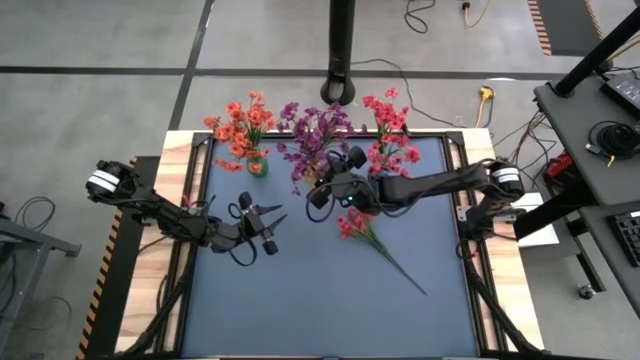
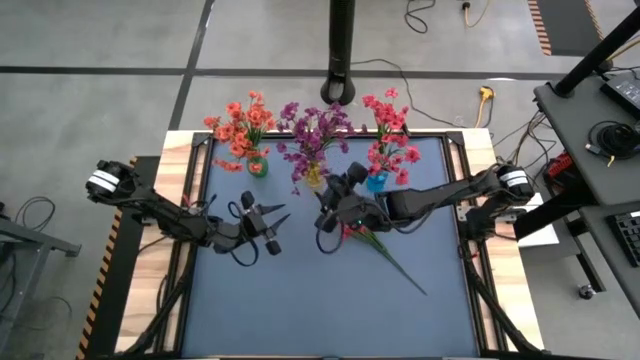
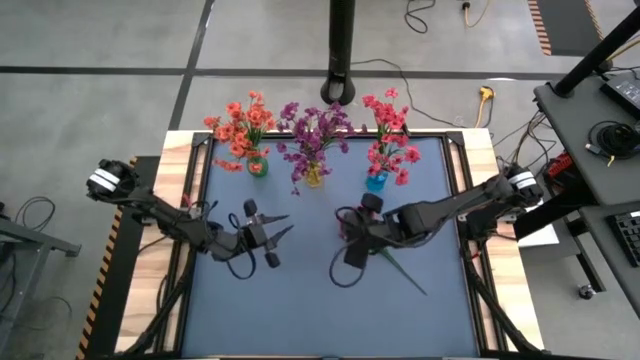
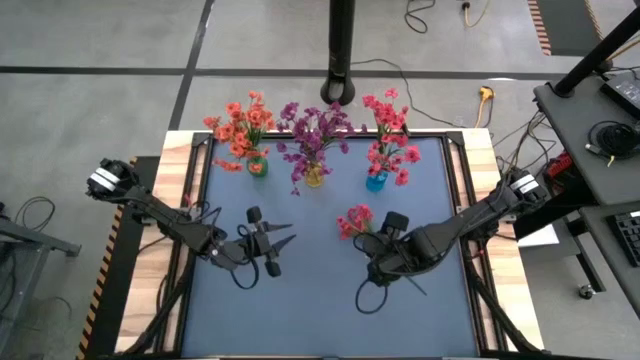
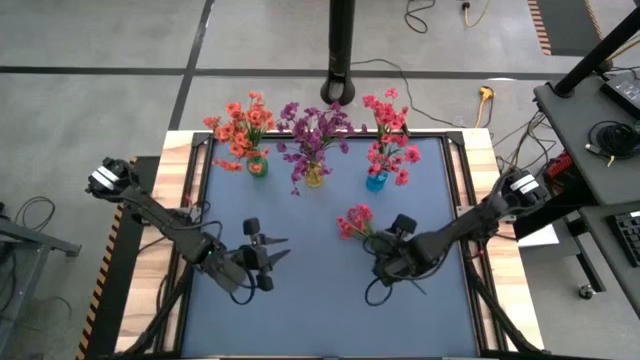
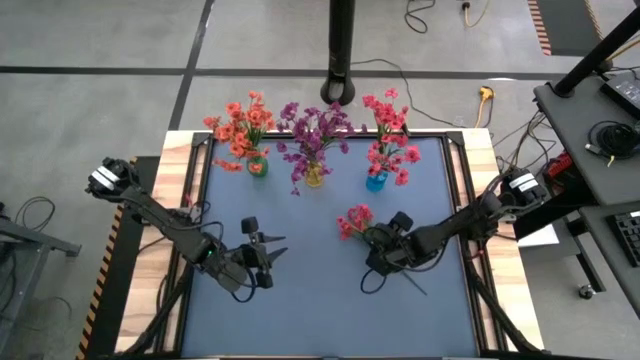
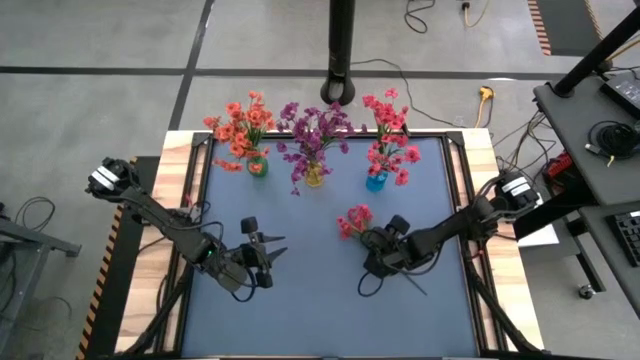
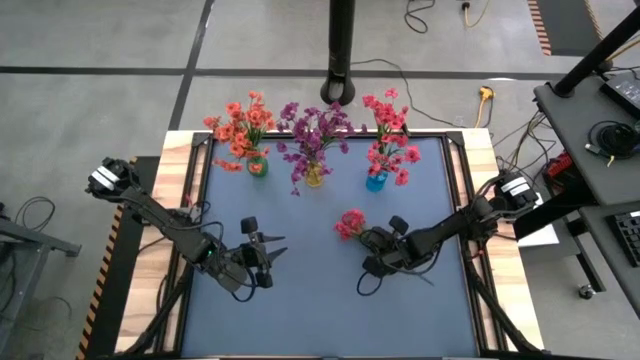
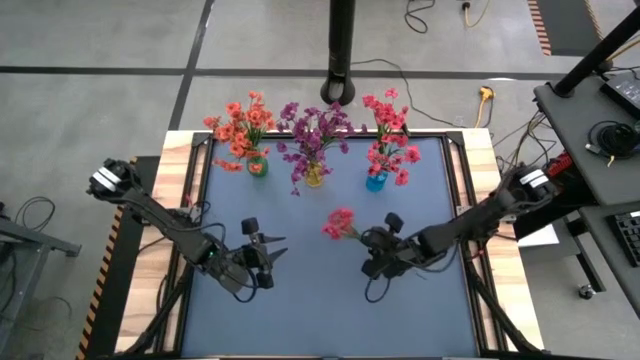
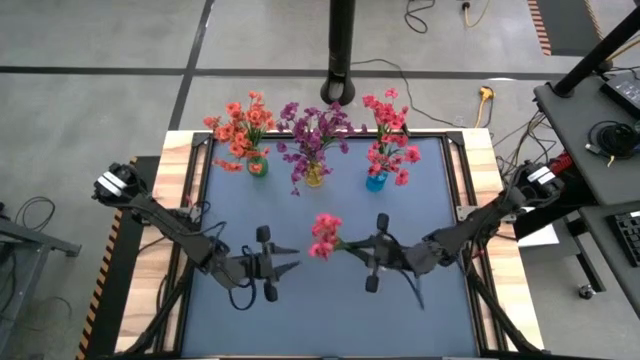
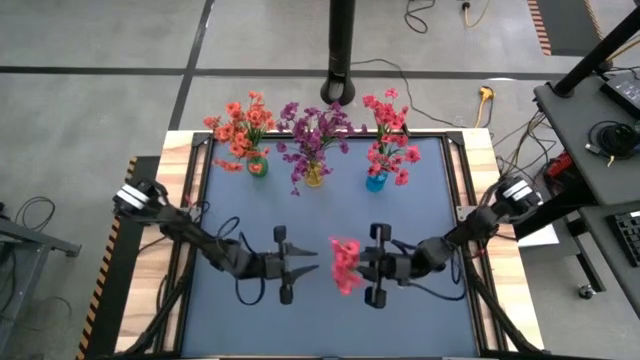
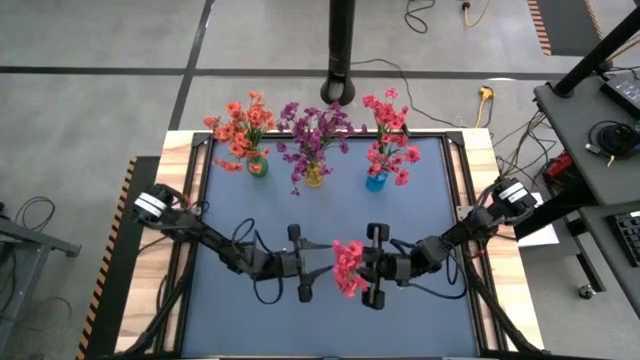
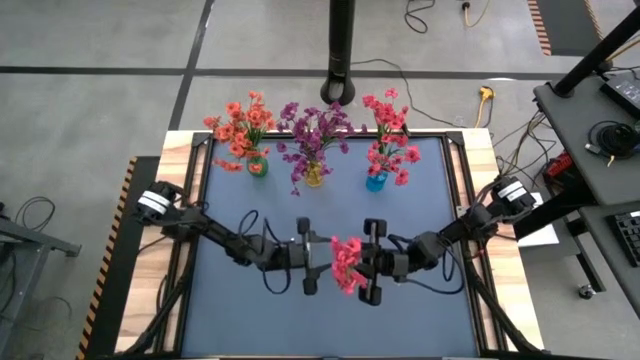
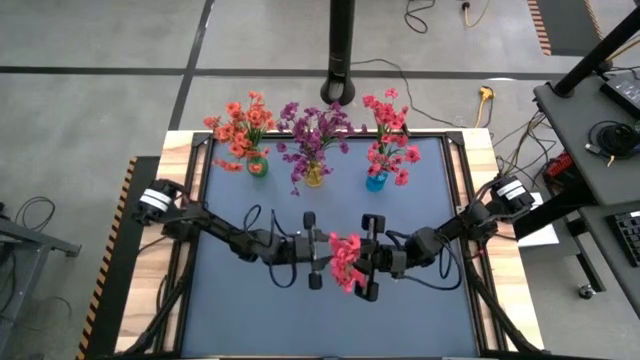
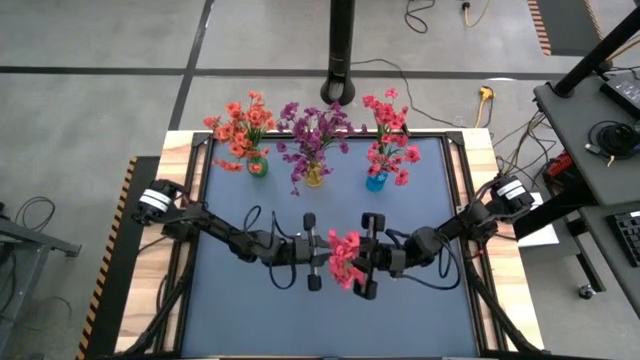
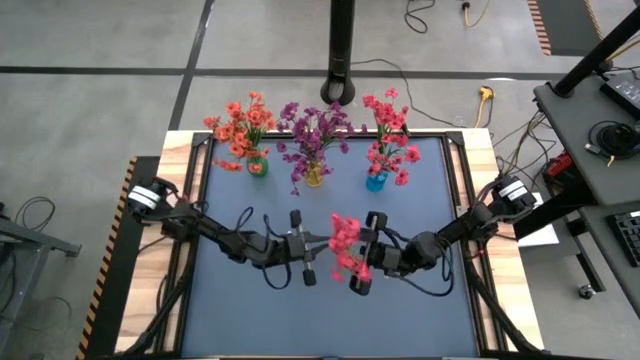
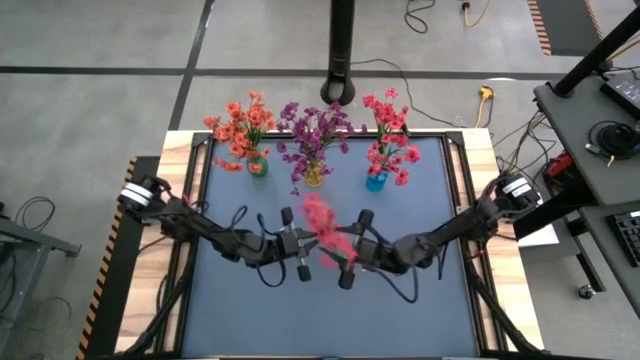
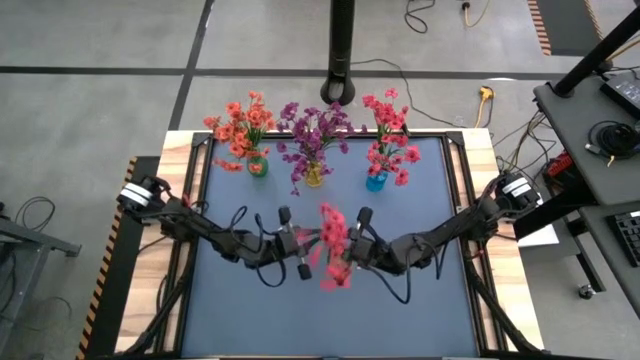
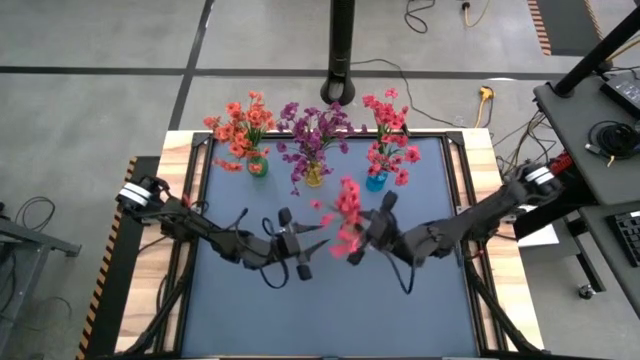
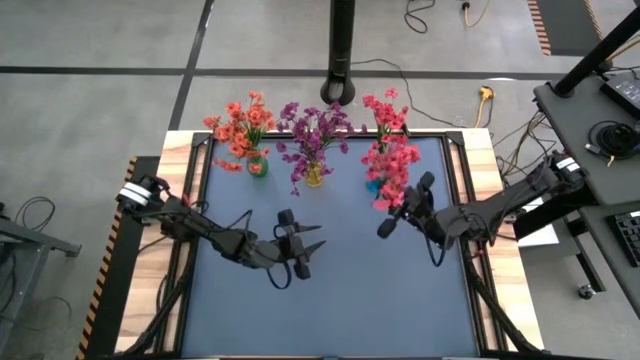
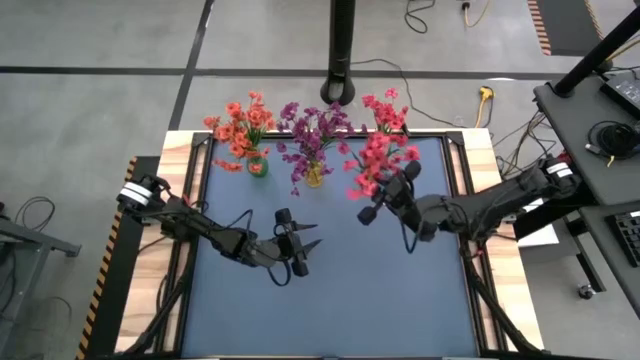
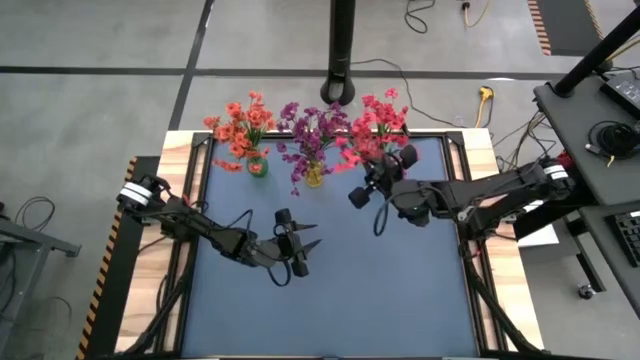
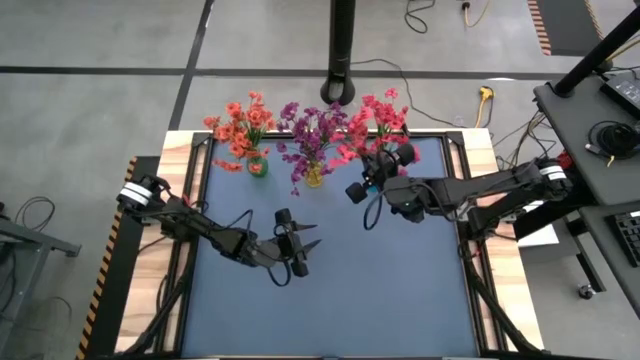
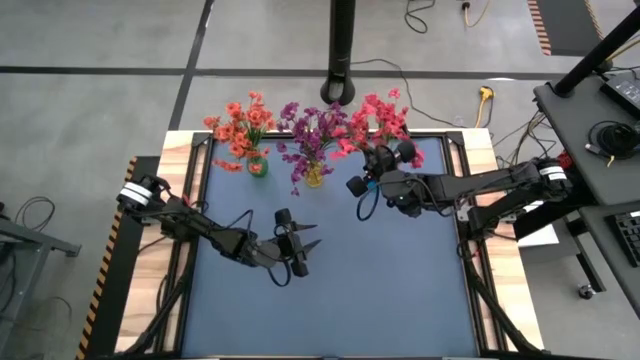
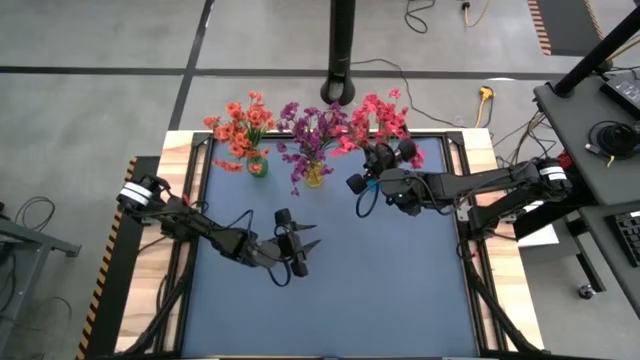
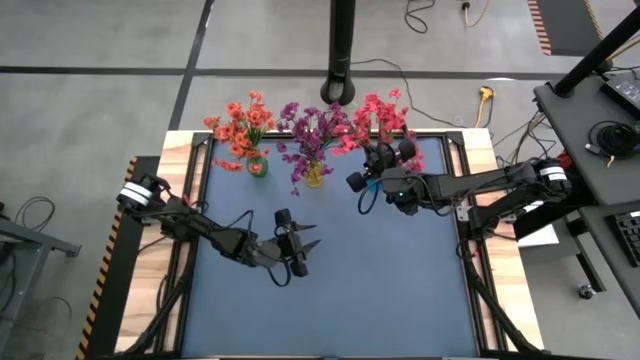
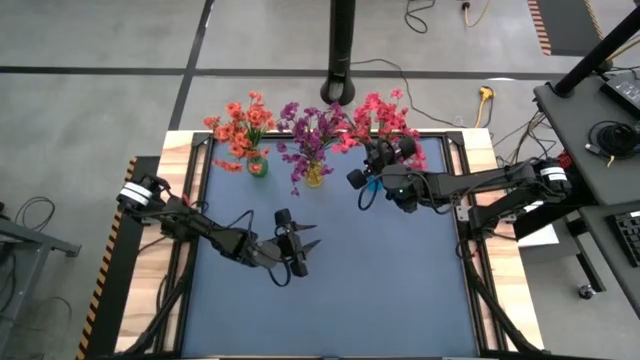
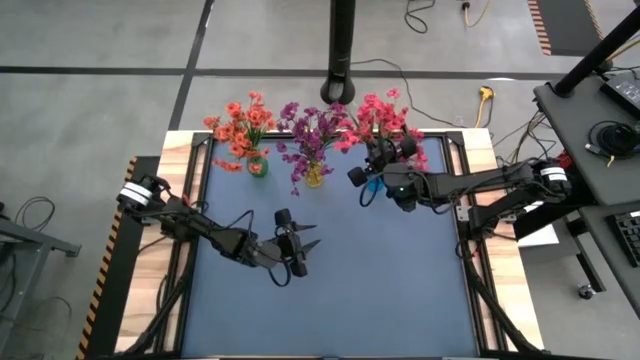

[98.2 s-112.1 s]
Task: Sort flowers into vase by color
Put the pink flowers into the blue vase

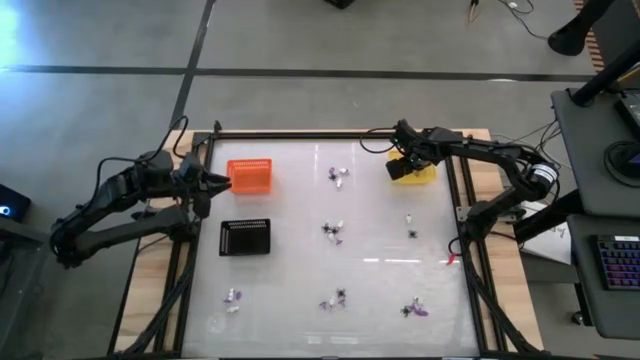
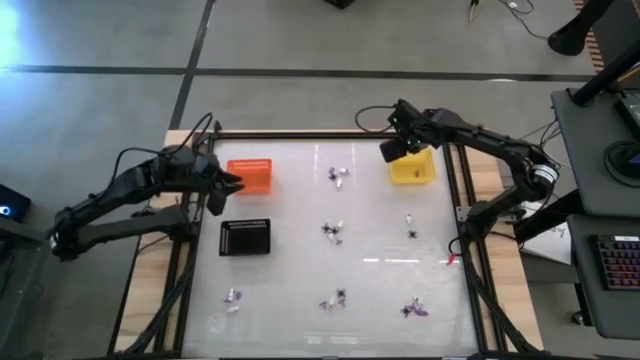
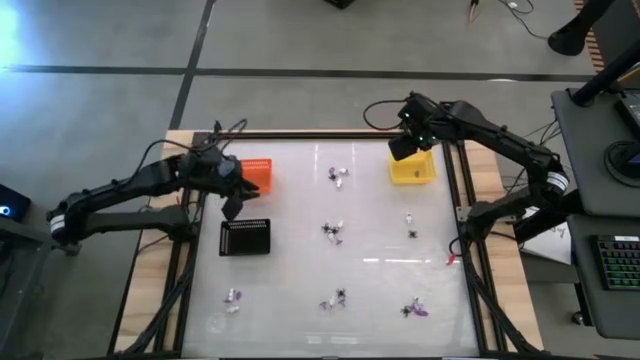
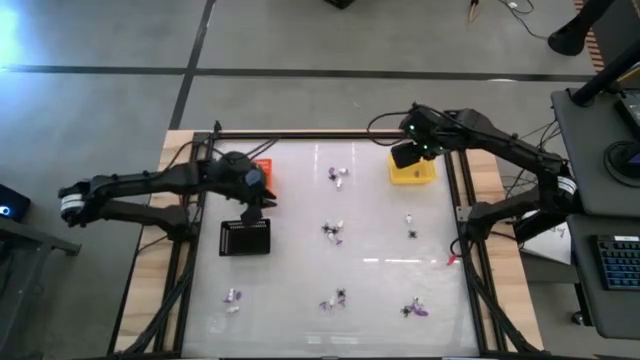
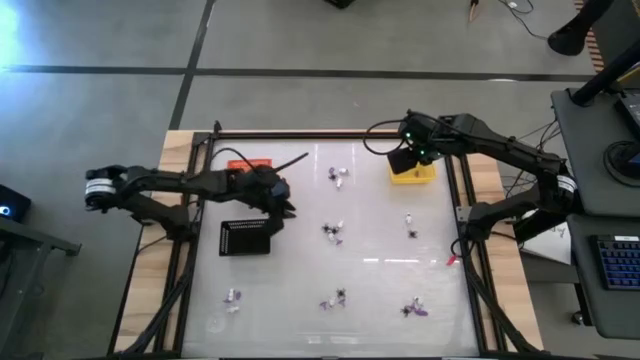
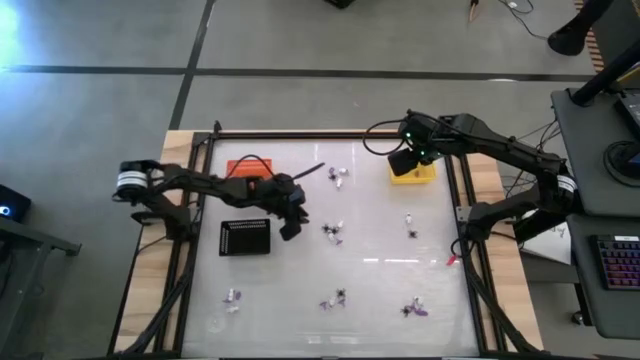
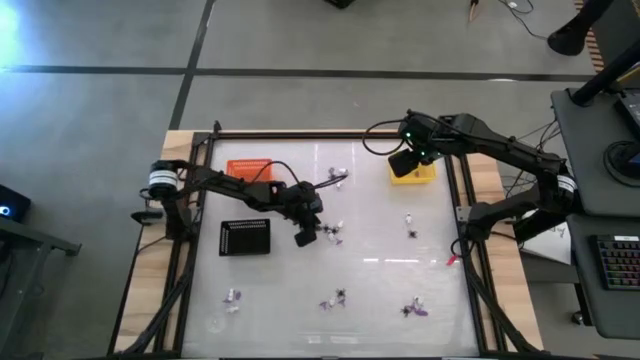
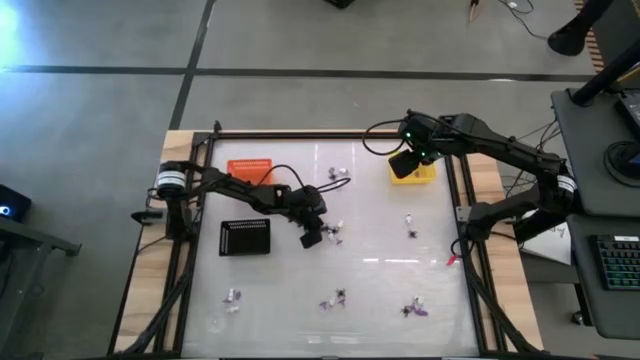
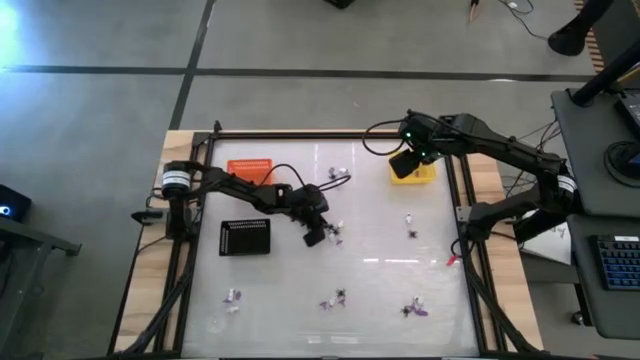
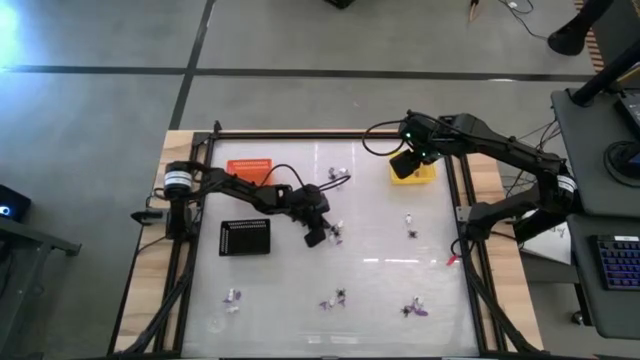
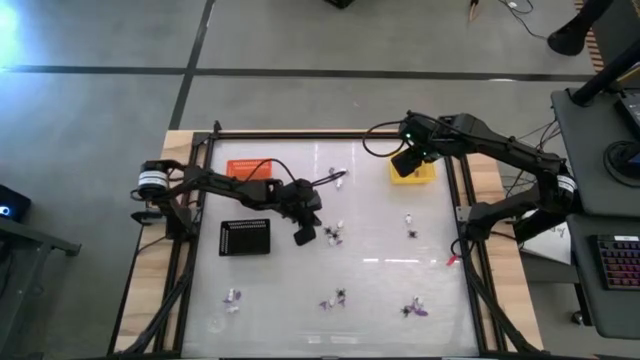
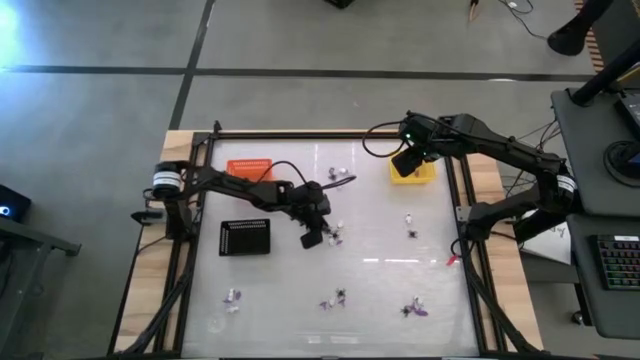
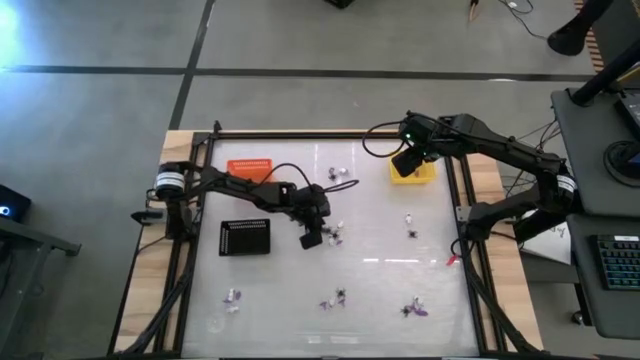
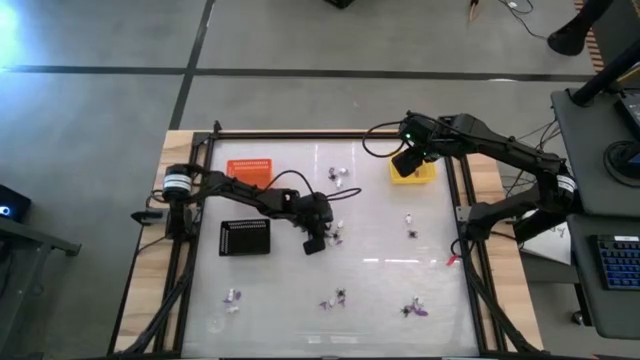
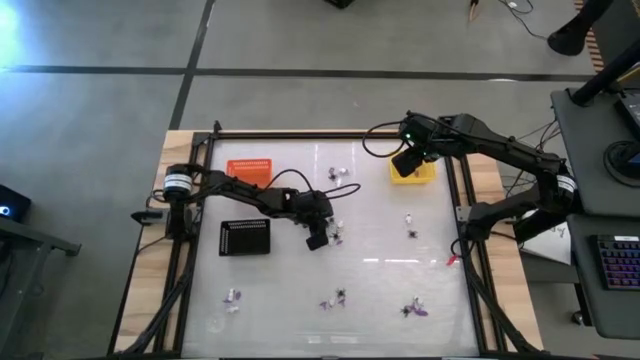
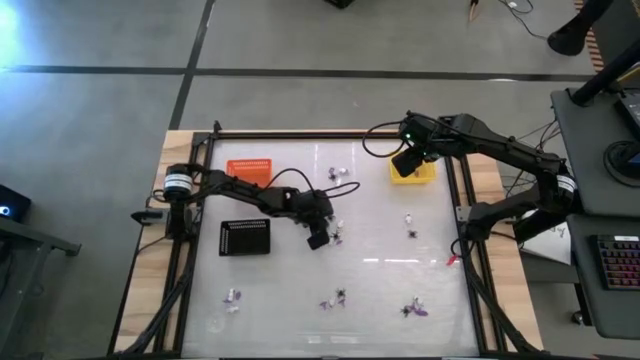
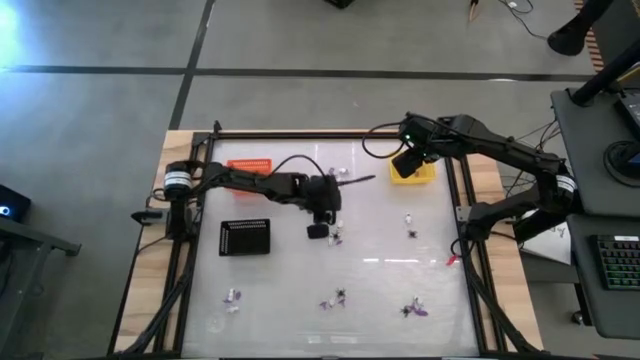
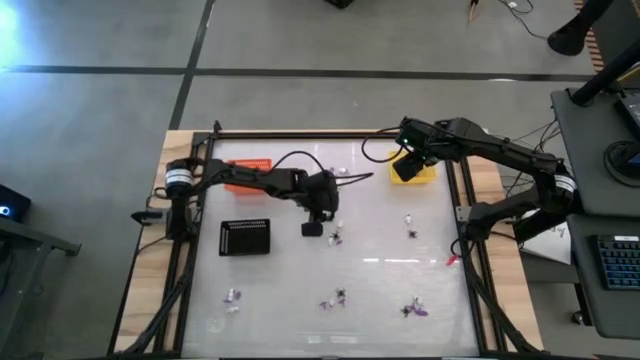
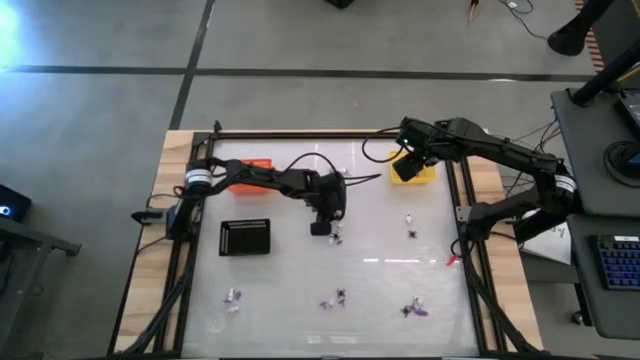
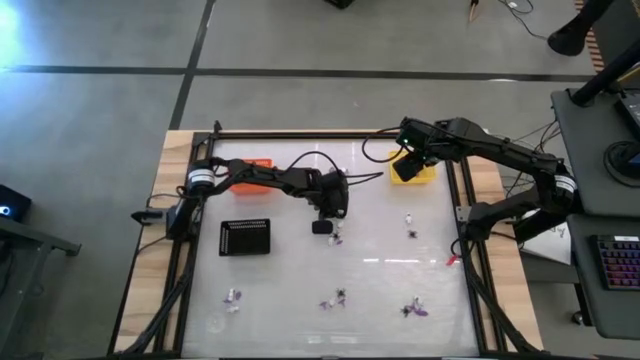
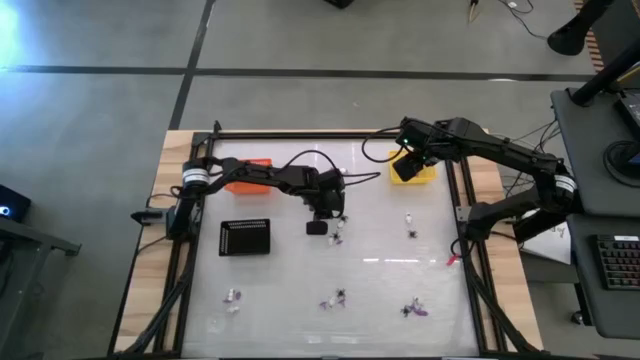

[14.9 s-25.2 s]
Task: Sort Halloween decoration
Put the black spider toy into the orange bin
